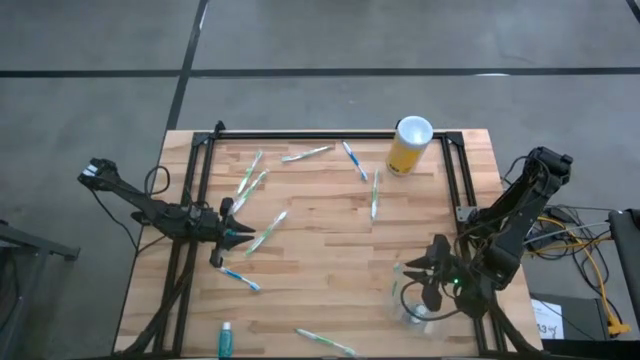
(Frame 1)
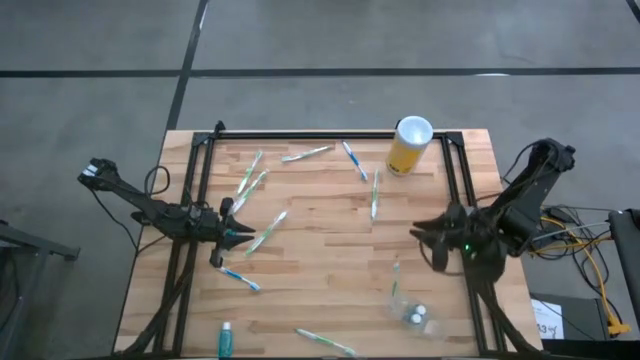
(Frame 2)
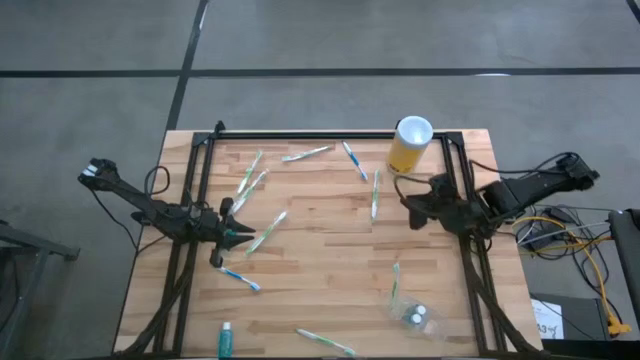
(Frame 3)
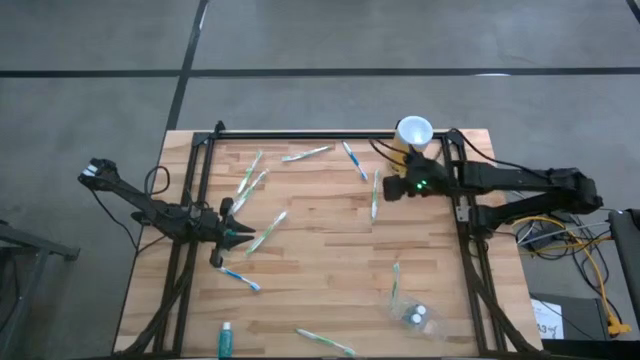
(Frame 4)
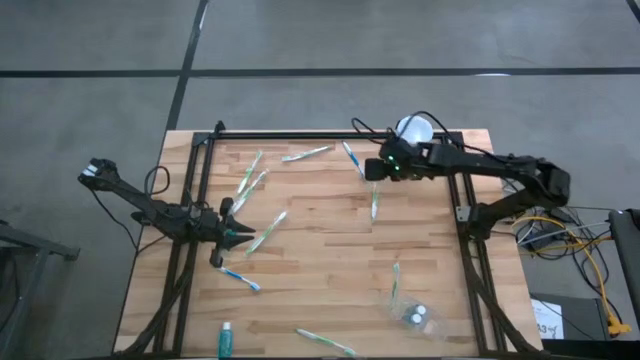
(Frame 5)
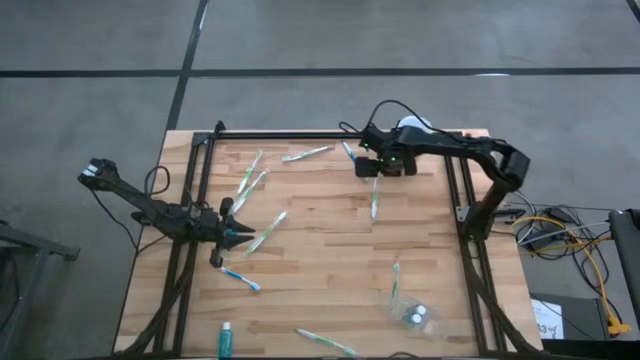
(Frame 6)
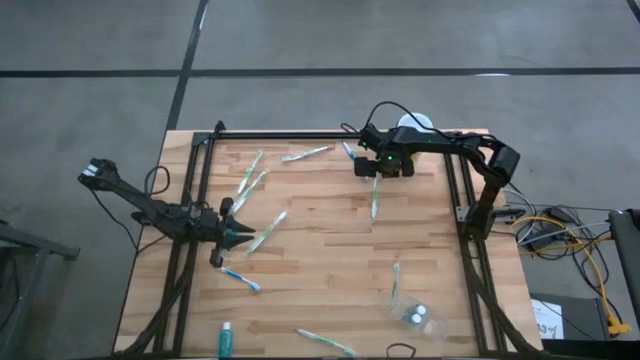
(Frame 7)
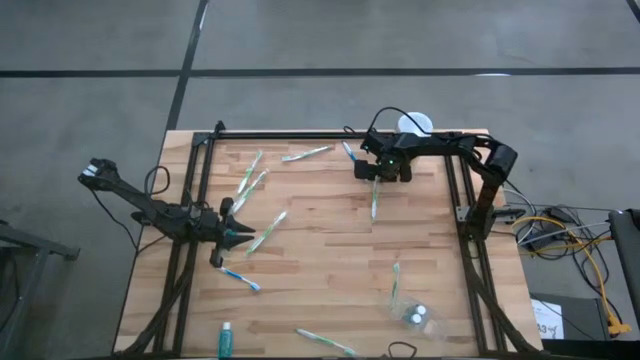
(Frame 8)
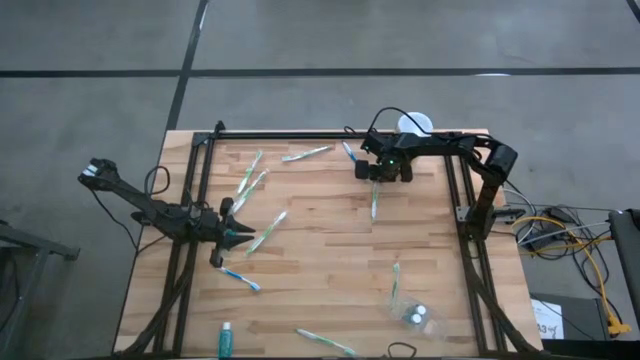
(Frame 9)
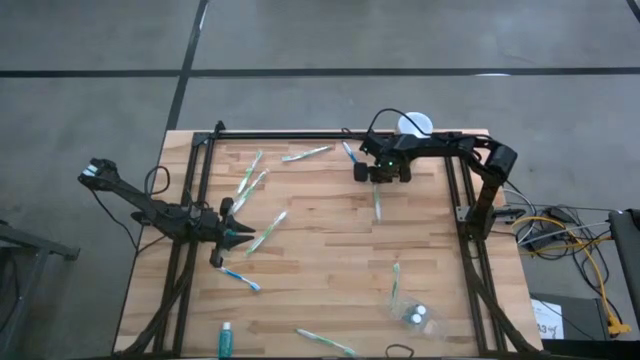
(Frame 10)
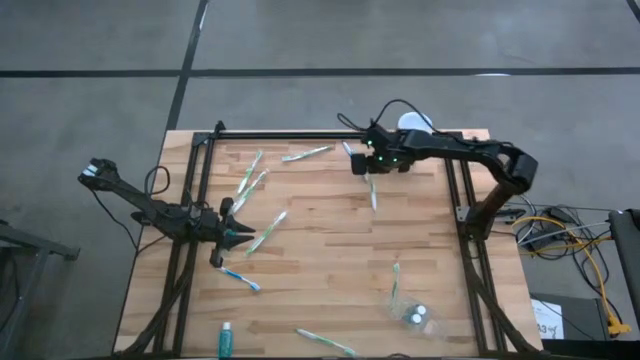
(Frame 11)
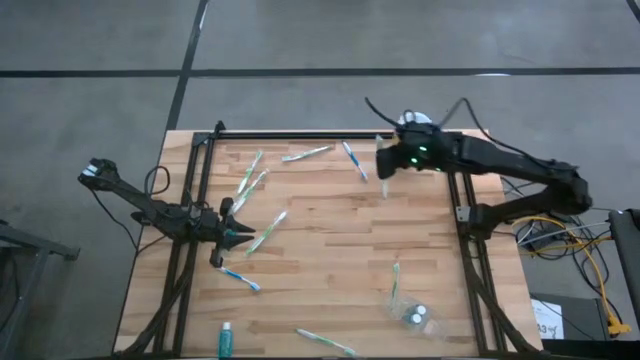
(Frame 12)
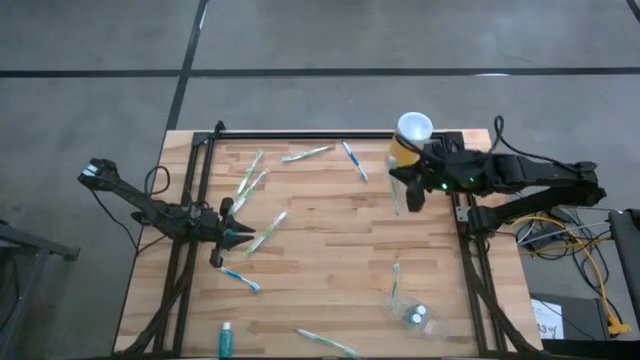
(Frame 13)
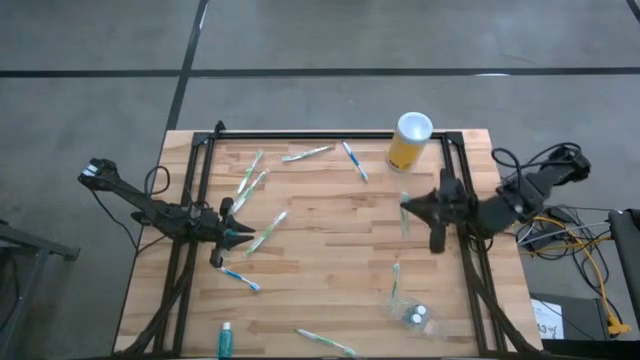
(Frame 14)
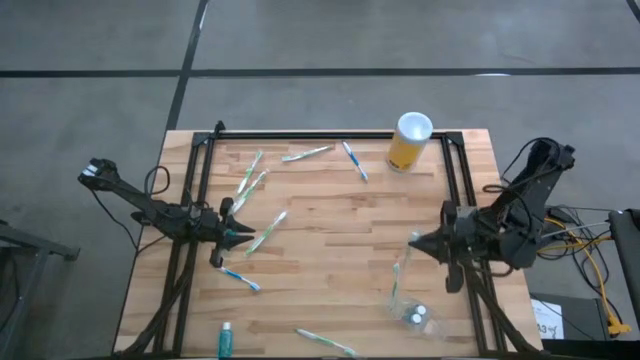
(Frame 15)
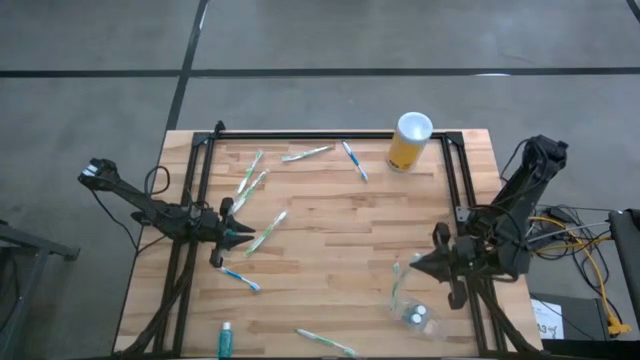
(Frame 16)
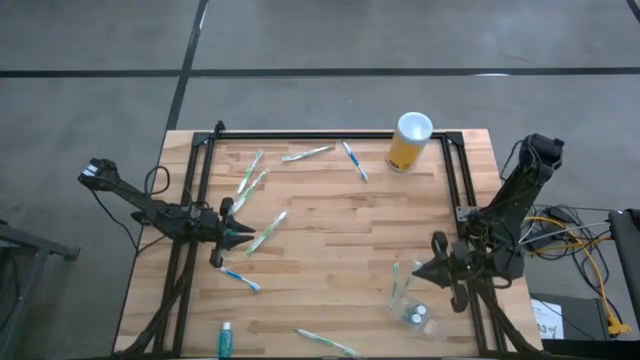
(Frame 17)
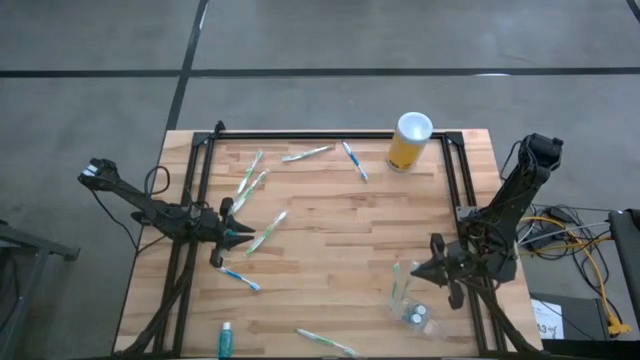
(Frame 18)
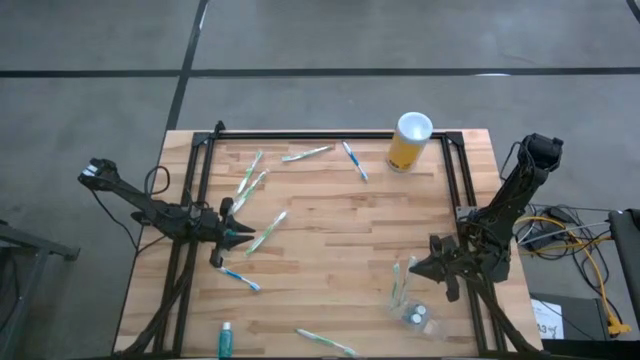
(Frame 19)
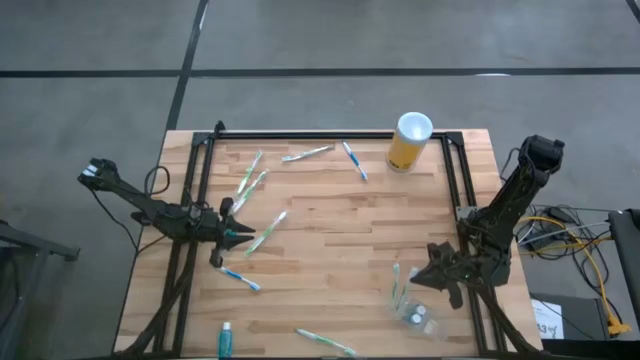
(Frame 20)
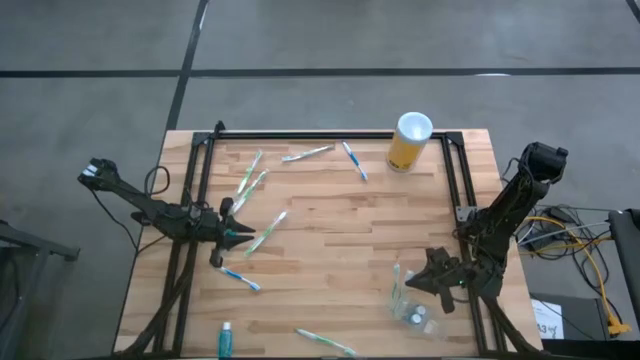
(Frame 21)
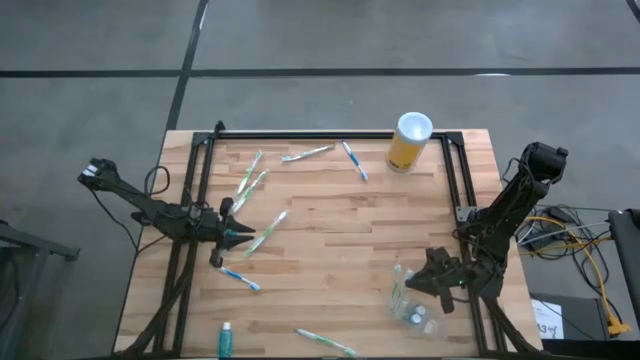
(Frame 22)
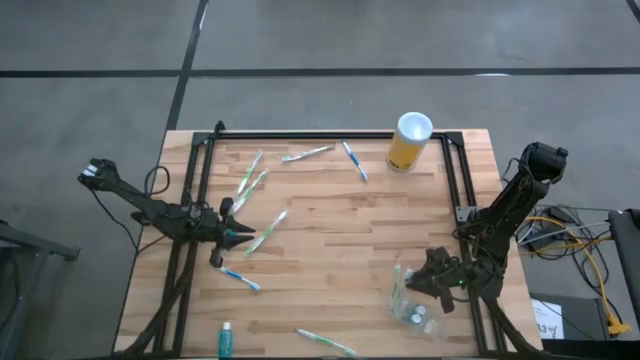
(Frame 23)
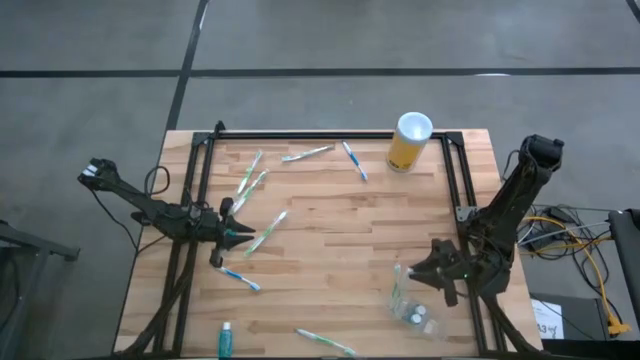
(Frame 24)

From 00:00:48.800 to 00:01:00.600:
Task: Pick & Place toothbrushing station
Put the green toothbrush into the transparent organizer

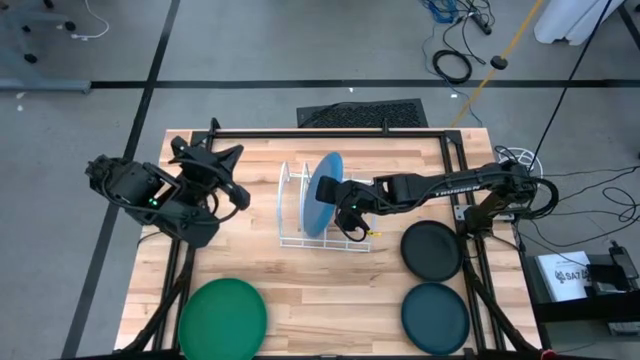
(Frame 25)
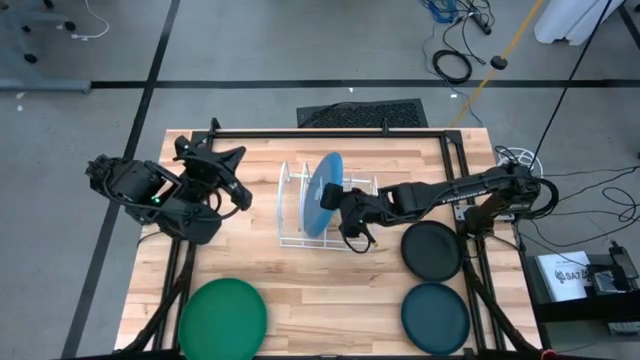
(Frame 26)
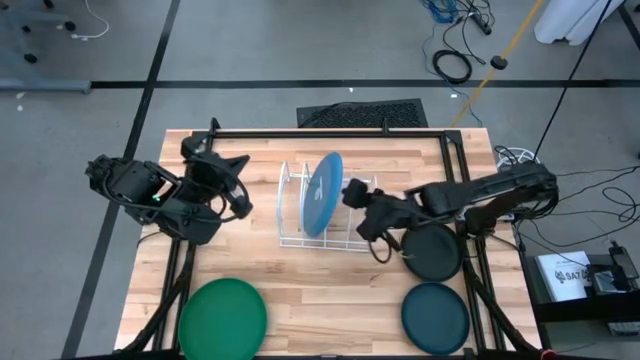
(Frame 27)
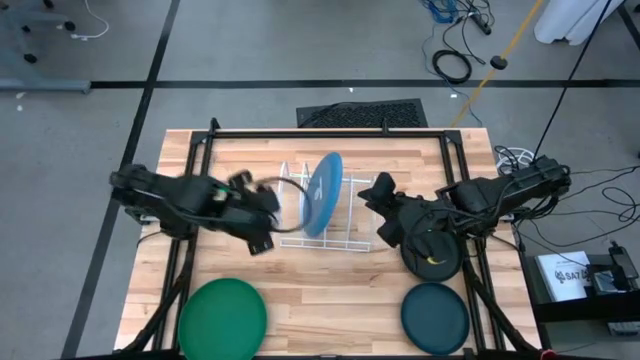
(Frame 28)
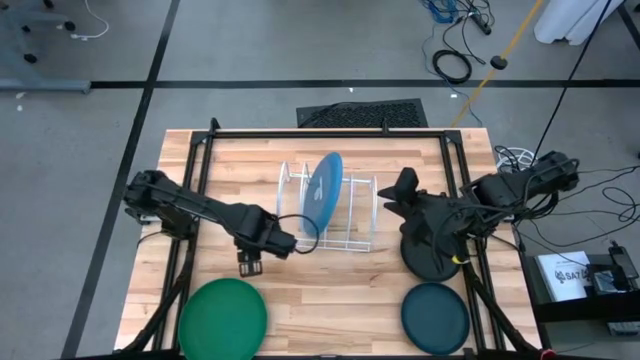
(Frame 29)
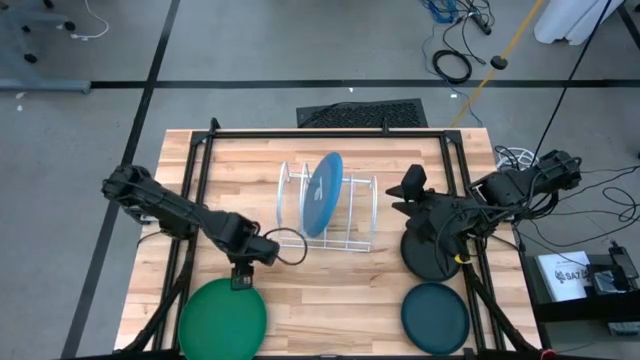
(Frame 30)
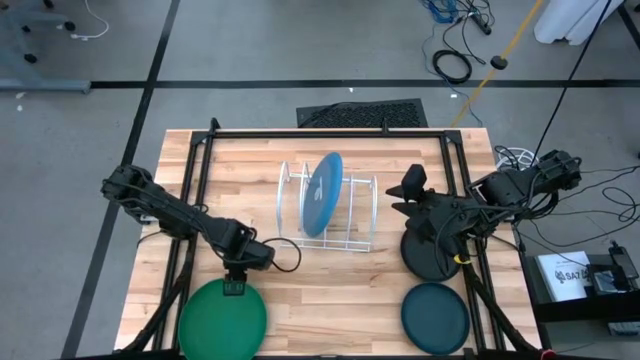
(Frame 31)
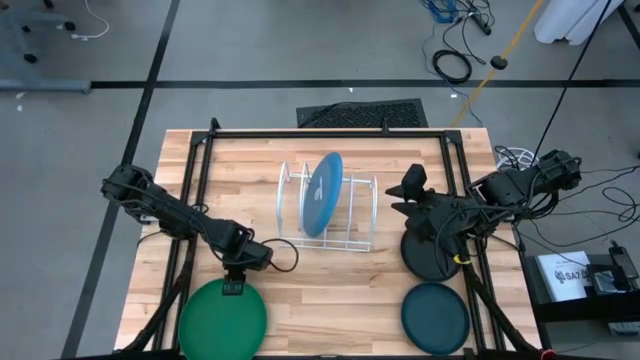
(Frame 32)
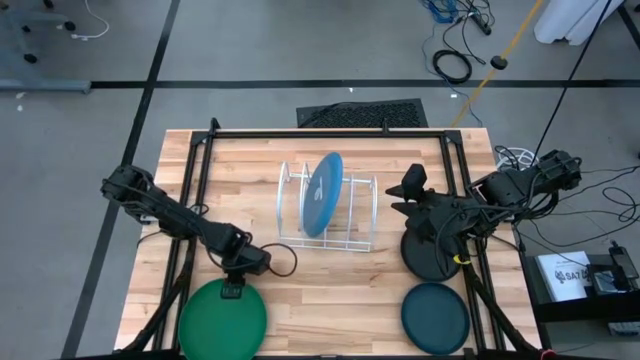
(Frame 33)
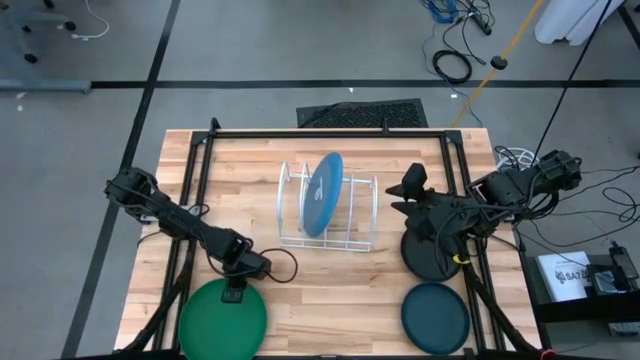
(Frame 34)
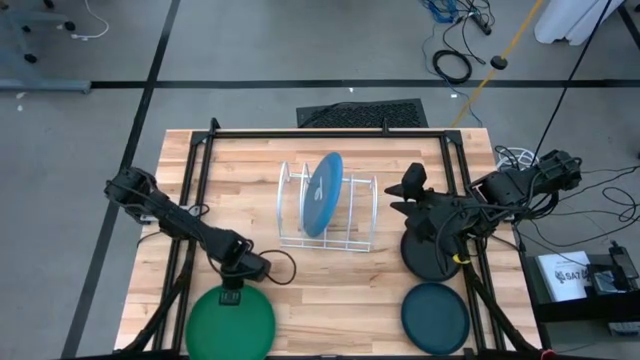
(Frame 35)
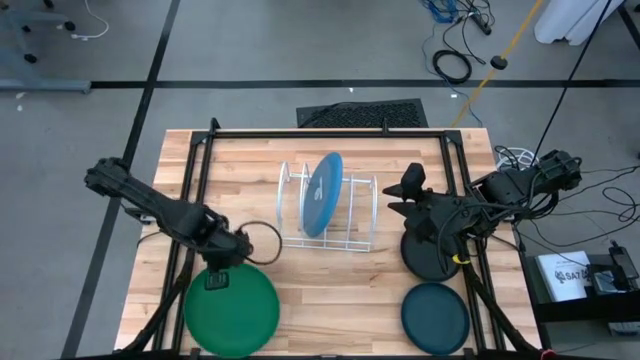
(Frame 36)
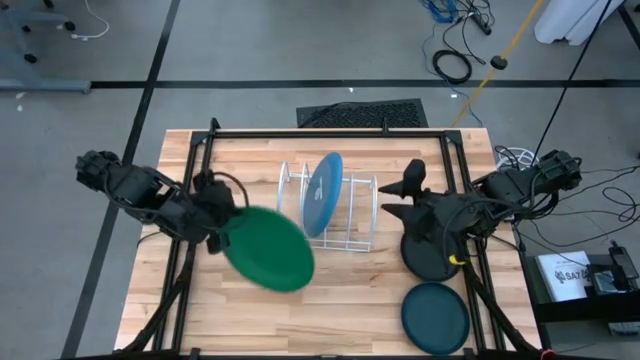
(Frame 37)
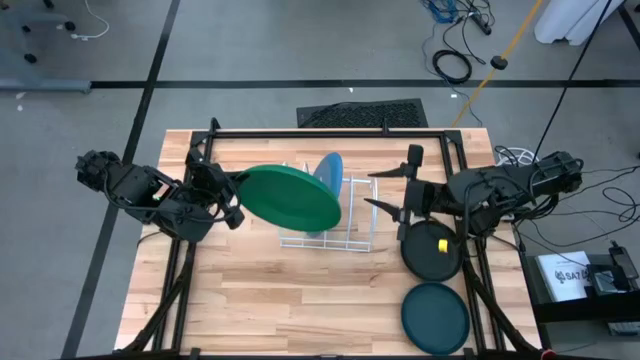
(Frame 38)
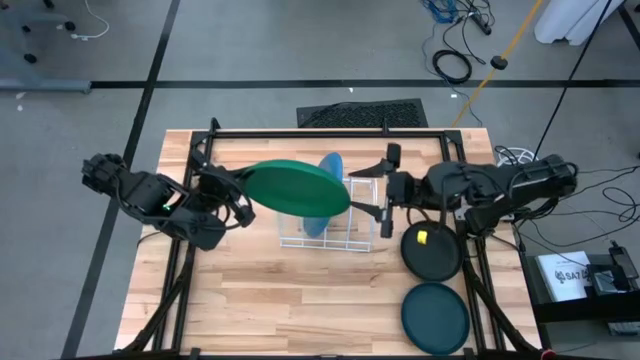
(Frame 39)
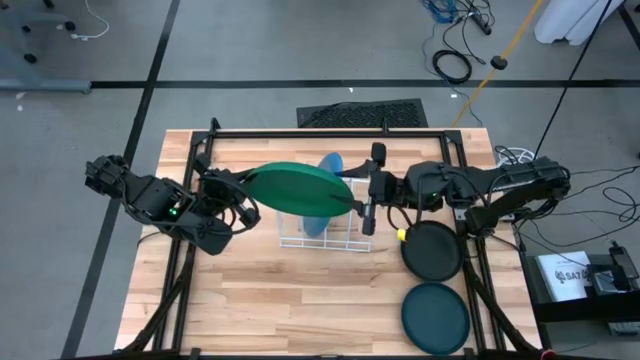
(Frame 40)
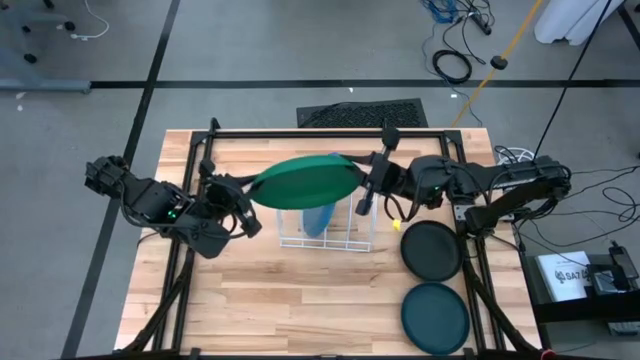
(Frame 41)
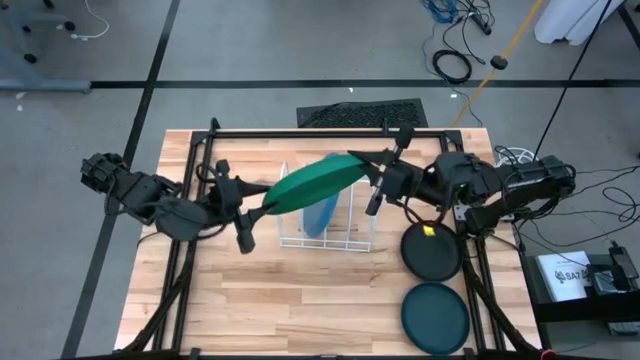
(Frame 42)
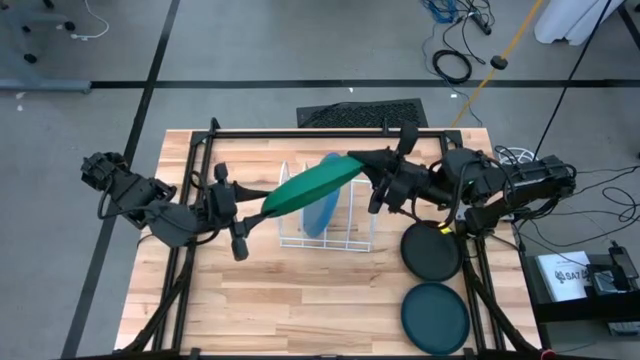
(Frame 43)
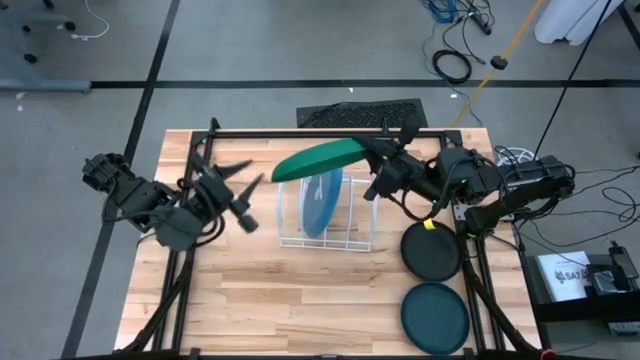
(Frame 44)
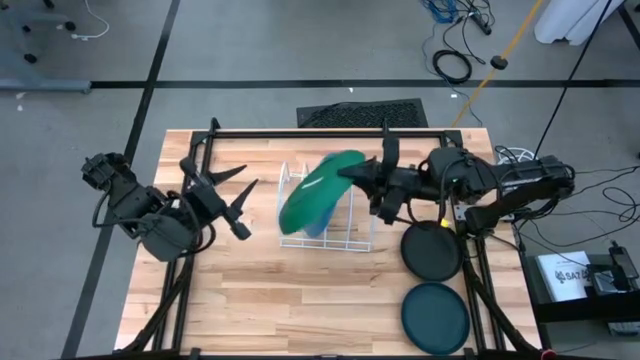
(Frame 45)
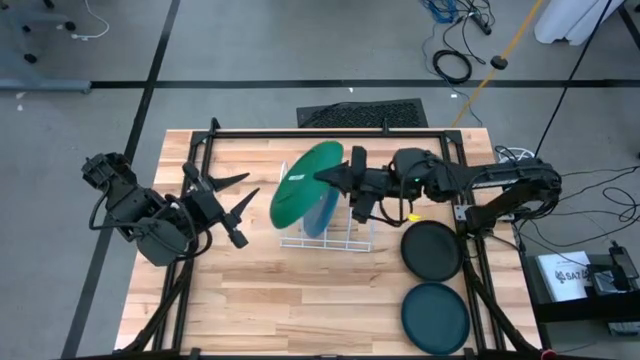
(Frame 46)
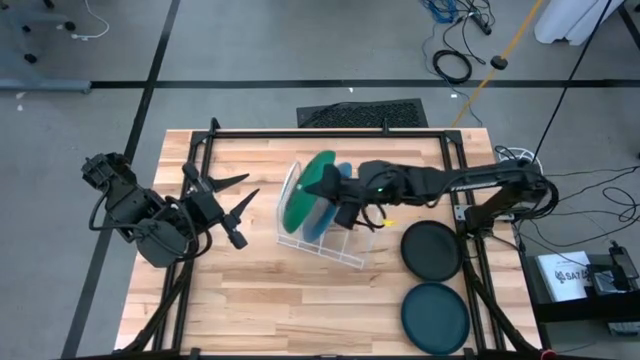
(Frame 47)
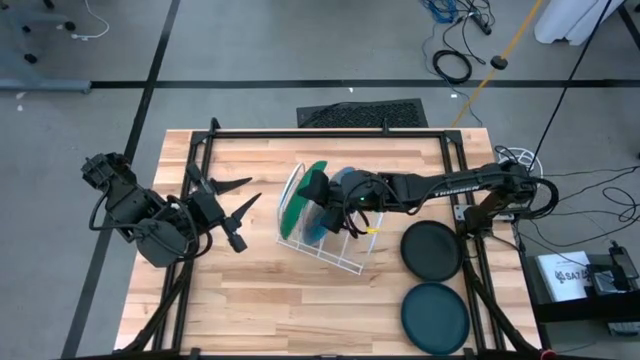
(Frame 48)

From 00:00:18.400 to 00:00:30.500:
Task: Sort dishes
Put the green plate in the dish rack
